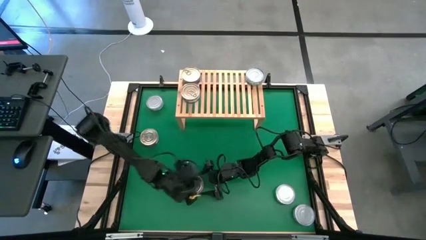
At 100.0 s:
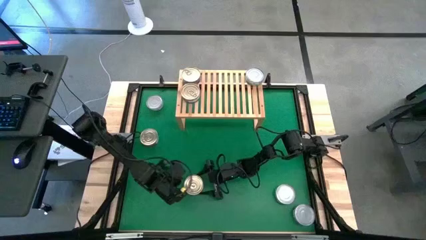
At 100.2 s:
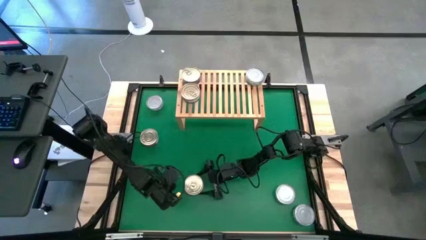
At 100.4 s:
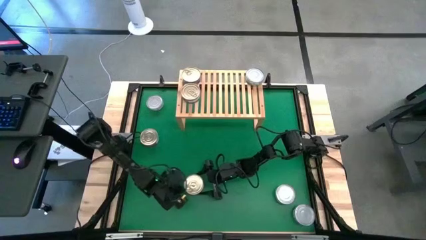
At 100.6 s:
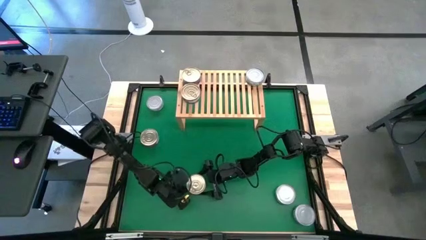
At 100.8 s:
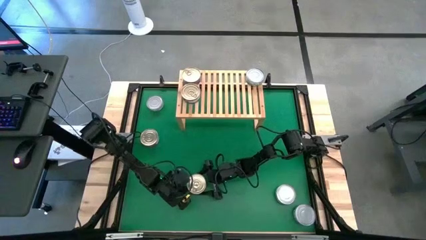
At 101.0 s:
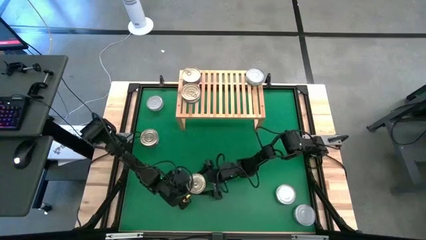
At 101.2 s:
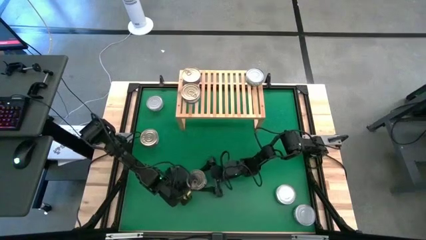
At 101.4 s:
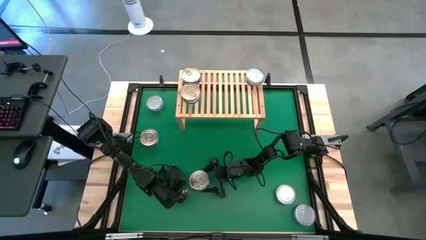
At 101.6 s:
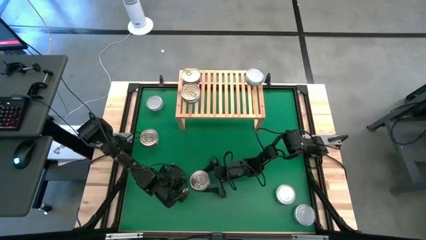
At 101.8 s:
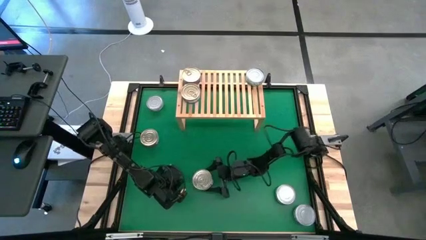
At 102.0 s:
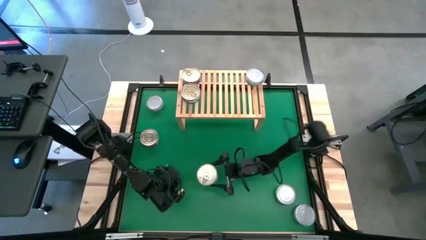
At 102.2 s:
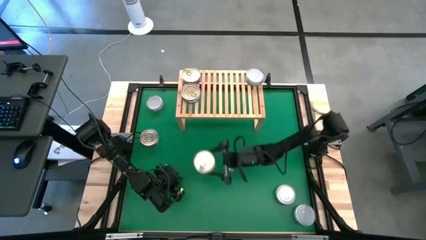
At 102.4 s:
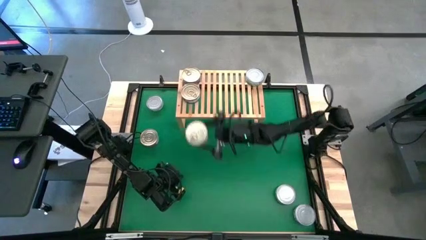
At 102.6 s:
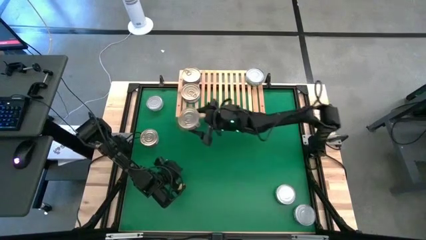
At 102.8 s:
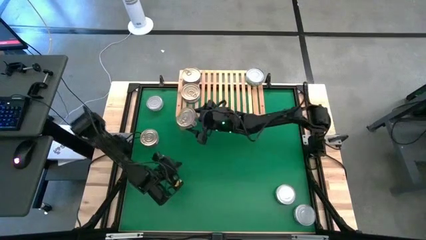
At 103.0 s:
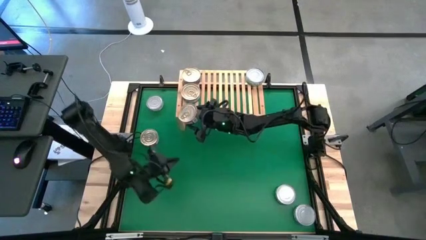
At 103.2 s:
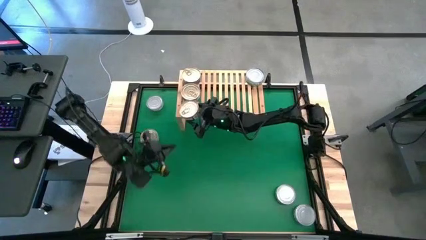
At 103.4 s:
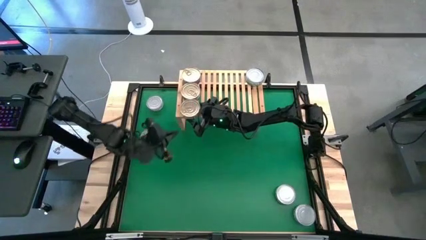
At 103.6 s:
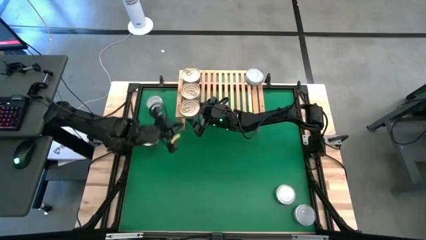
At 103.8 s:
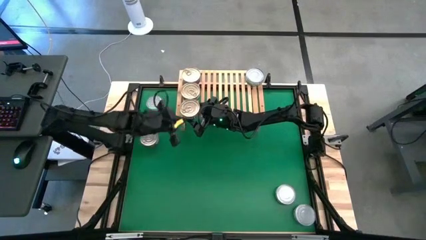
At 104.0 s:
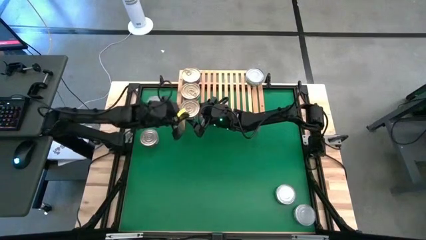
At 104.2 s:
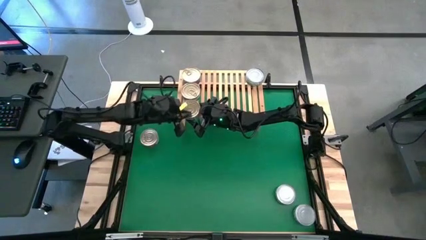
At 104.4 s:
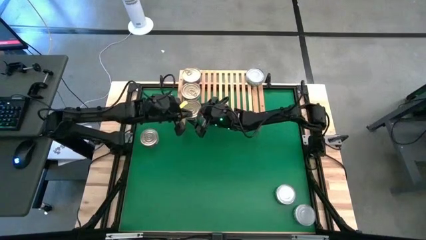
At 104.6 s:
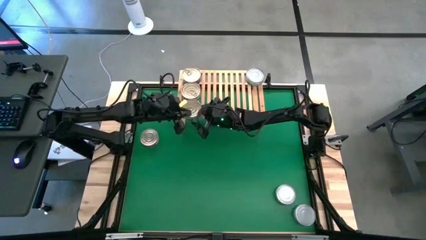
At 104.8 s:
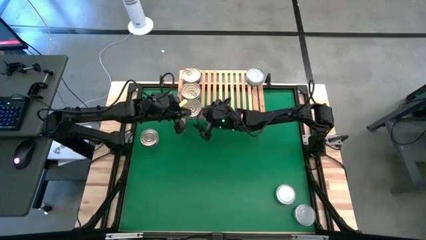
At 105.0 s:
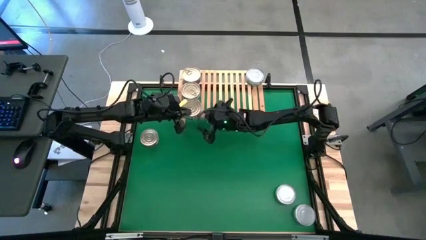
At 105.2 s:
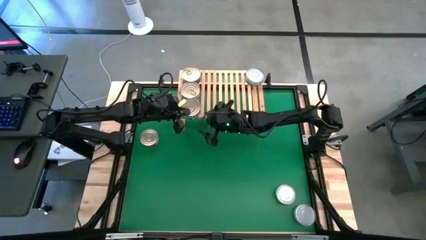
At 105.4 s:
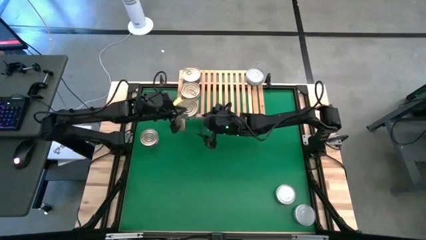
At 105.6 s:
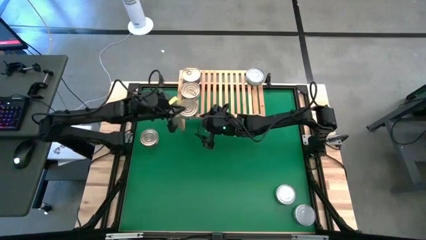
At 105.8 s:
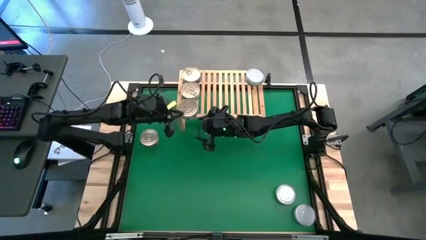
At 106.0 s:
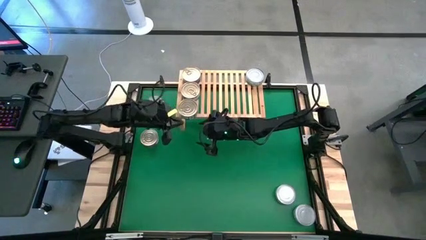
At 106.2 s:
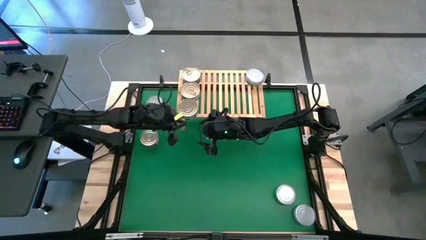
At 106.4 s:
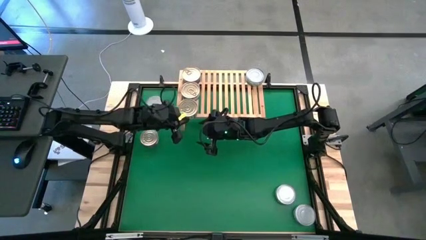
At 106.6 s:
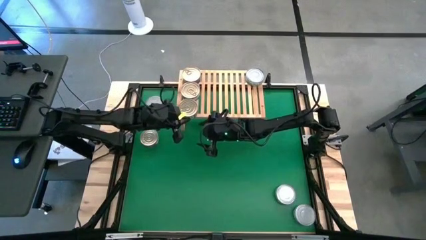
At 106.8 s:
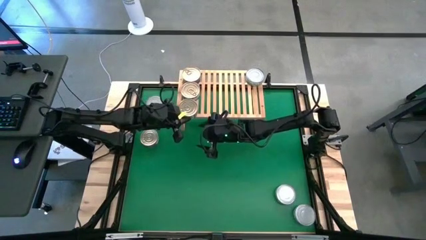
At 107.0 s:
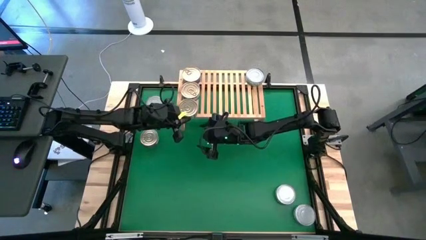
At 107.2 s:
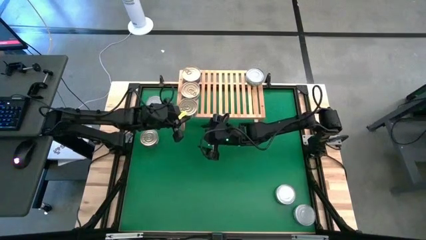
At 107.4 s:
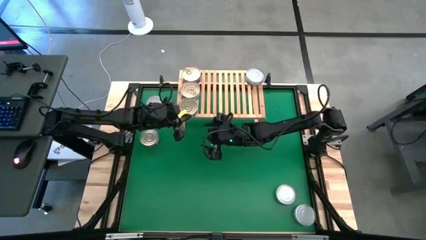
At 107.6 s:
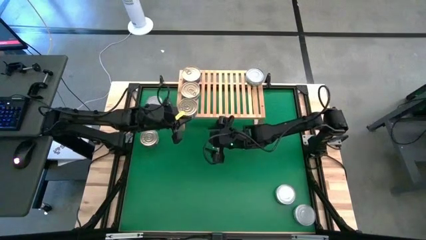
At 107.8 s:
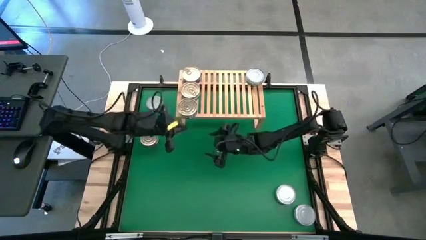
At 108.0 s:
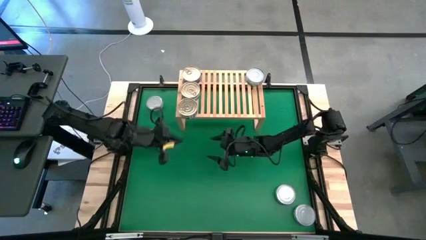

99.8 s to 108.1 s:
Task: Stack canned seafood by type on shelf
Put the bottom middle blue tuna can on the shelf aligned with the other blue tuna can

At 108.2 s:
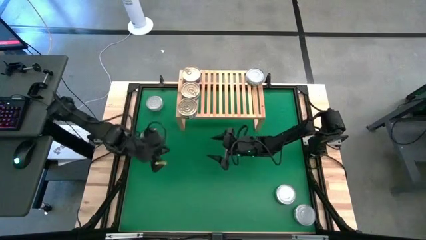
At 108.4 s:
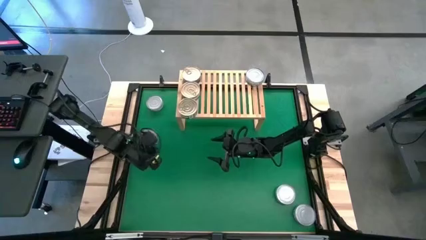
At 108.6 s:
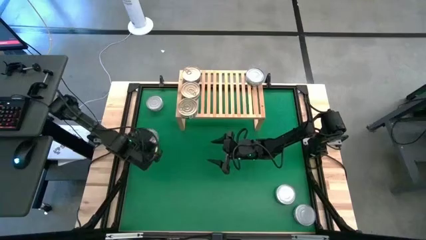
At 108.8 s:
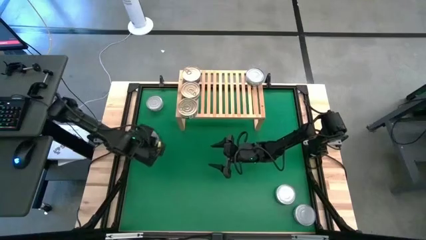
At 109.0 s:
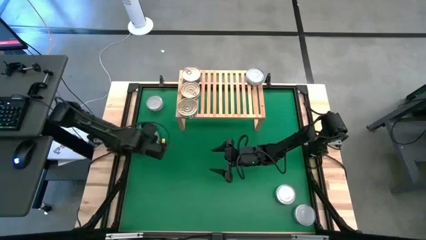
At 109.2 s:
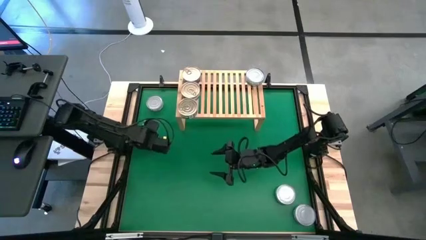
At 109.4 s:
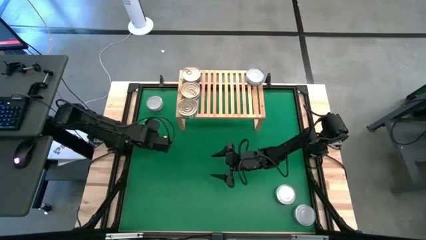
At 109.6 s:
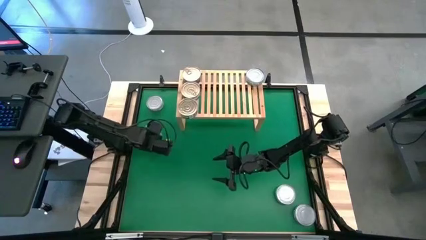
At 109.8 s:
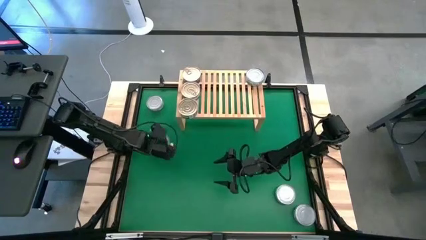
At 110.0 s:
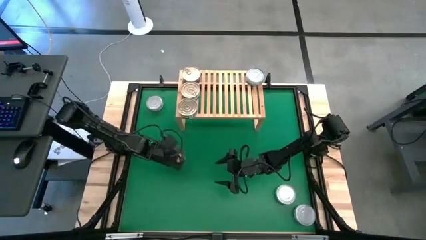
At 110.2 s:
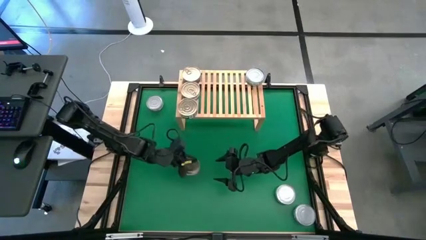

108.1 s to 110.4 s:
Move the left blue tuna can to the center of the table

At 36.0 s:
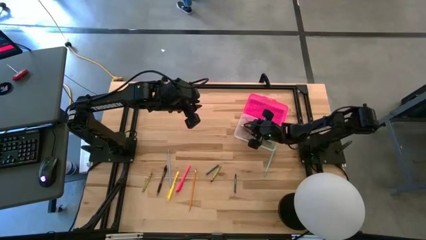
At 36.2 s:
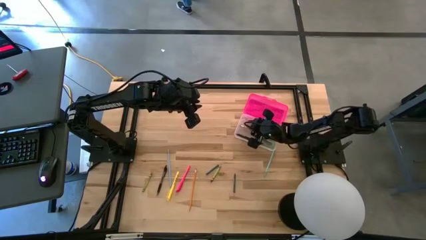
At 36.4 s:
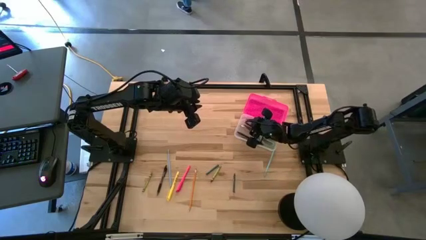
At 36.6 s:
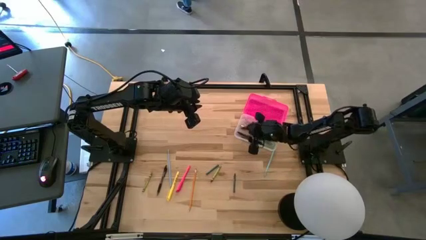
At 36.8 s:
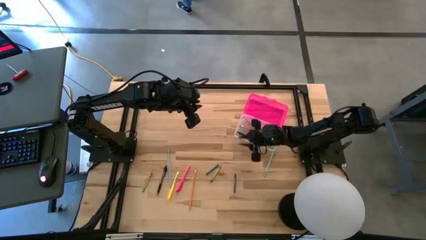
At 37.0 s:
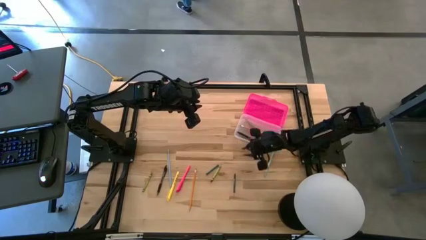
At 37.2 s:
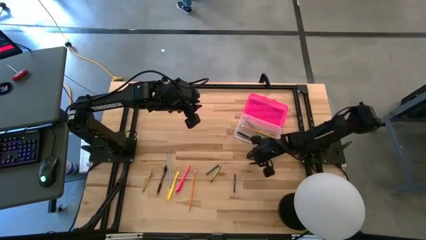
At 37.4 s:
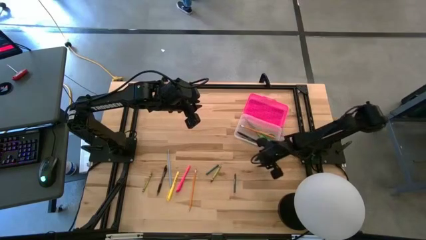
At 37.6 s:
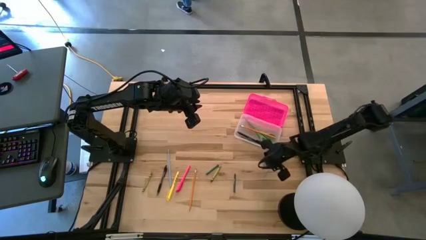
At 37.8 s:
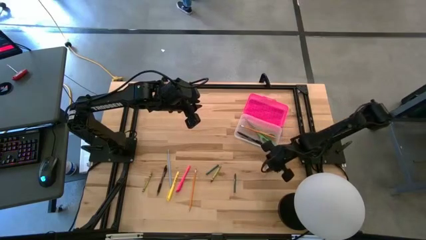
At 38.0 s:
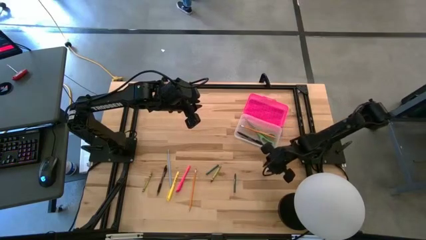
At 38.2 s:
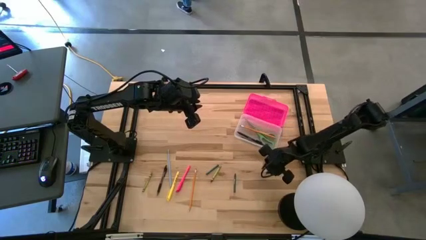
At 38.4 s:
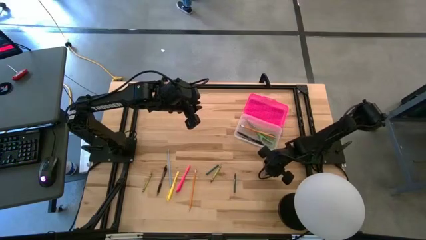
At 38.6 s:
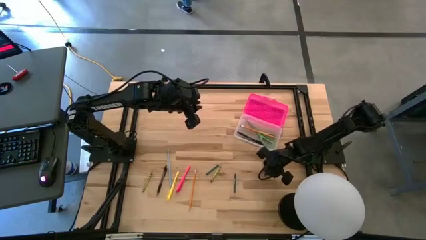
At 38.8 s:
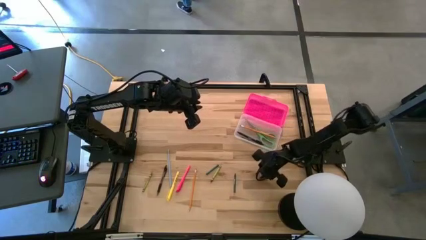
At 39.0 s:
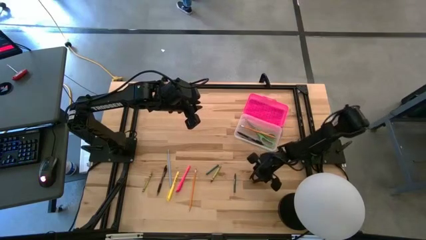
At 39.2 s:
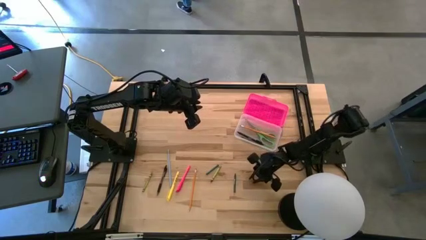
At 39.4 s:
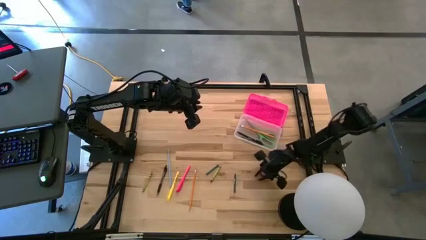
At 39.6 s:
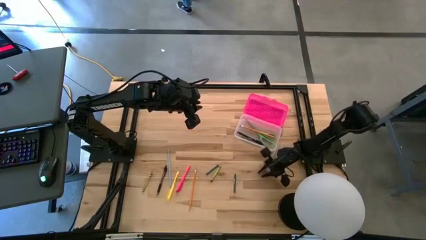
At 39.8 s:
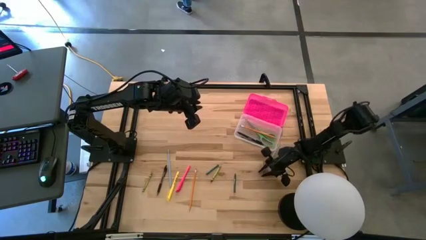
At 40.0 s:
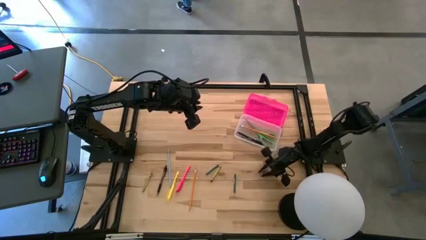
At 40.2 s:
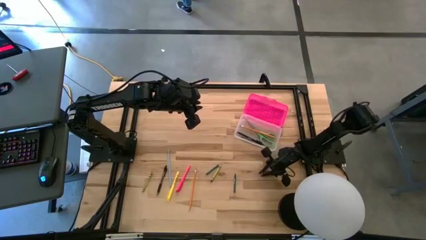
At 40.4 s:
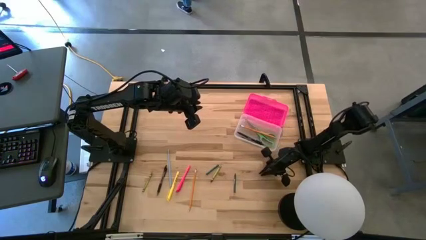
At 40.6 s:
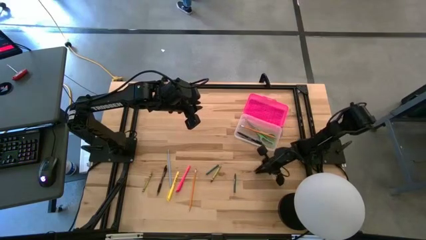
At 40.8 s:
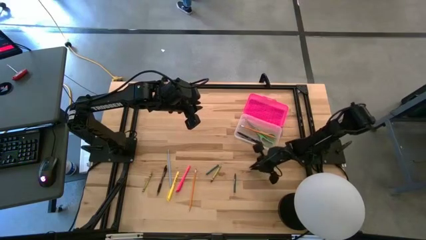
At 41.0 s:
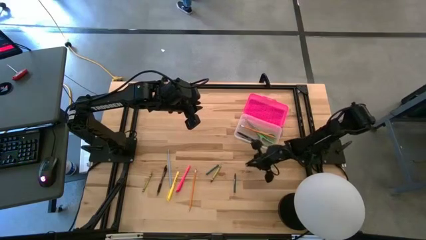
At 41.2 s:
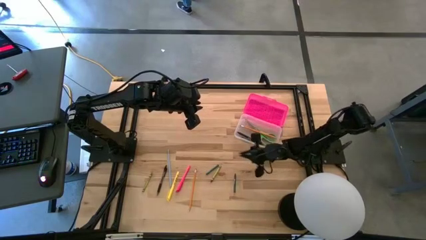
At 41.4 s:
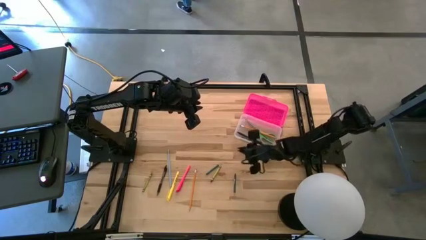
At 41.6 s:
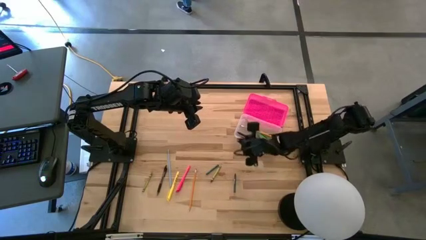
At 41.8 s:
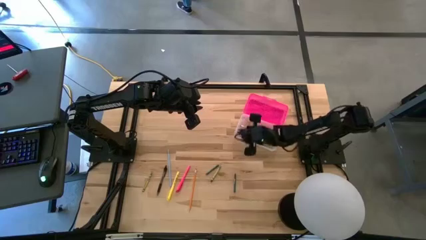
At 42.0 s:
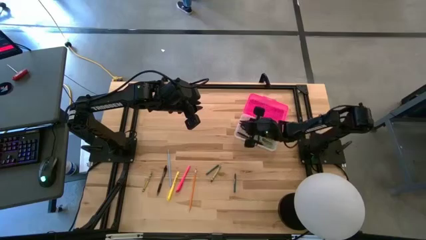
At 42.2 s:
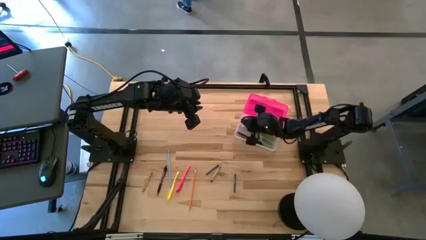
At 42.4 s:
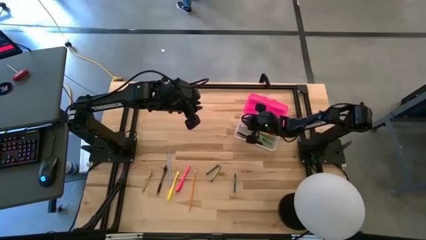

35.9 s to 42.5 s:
Task: Pick & place school supplies into a supply box
Put the light blue pencil into the pink supply box
